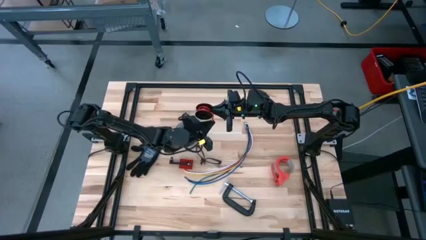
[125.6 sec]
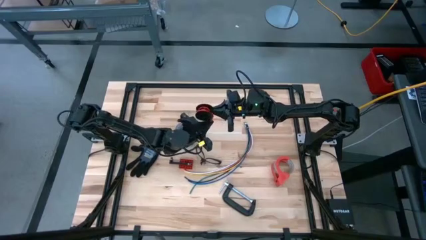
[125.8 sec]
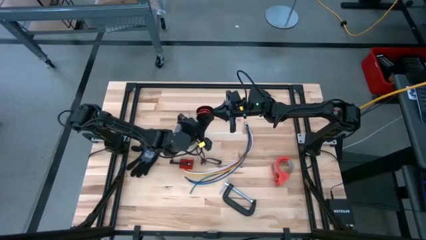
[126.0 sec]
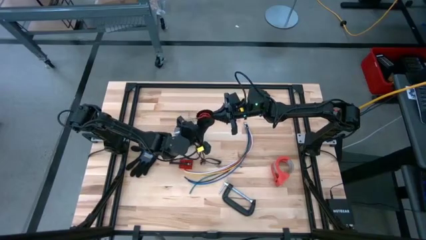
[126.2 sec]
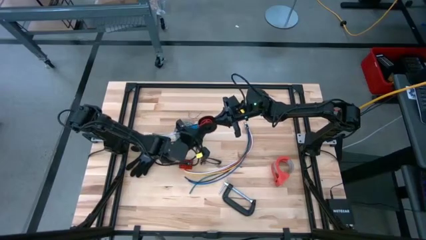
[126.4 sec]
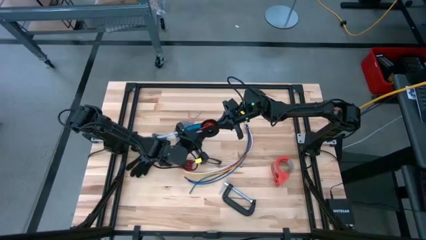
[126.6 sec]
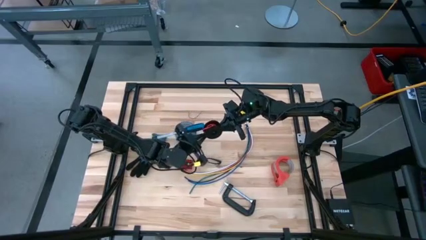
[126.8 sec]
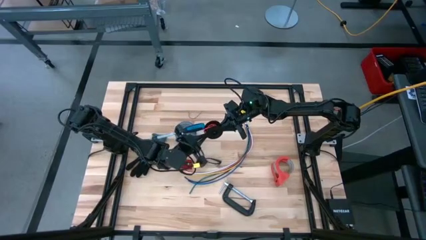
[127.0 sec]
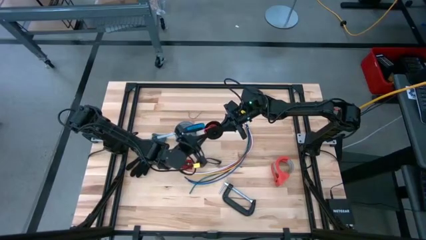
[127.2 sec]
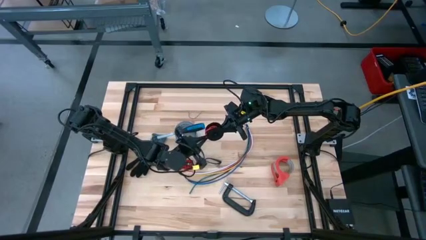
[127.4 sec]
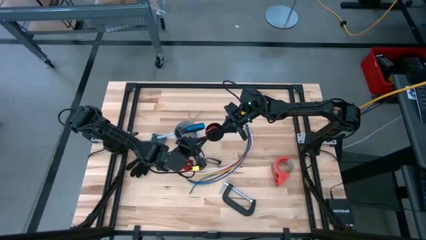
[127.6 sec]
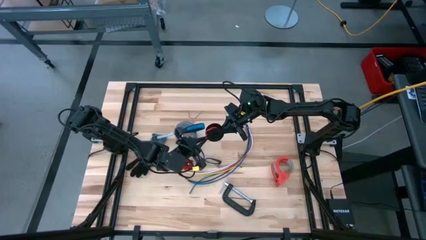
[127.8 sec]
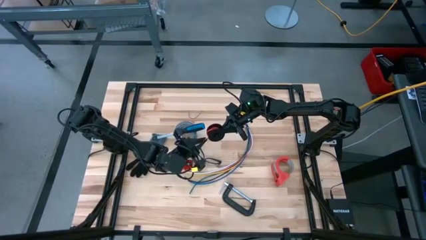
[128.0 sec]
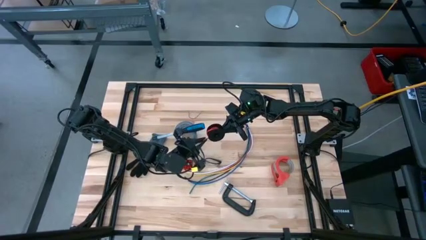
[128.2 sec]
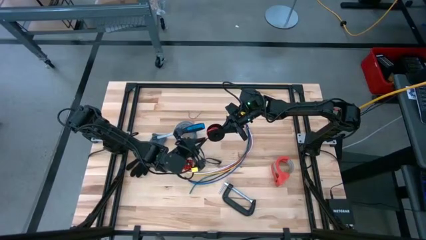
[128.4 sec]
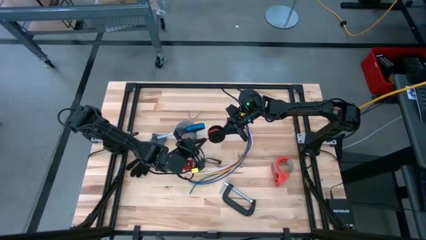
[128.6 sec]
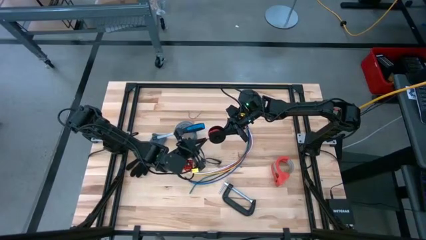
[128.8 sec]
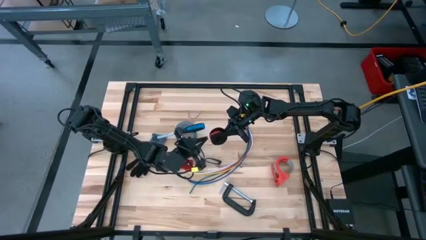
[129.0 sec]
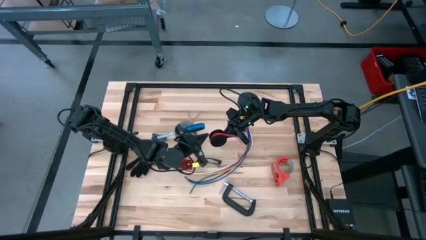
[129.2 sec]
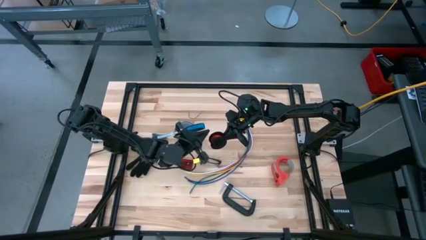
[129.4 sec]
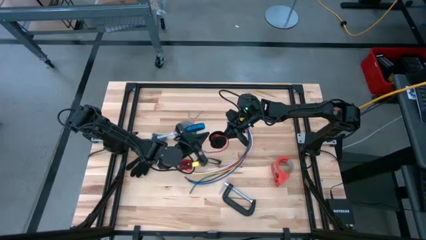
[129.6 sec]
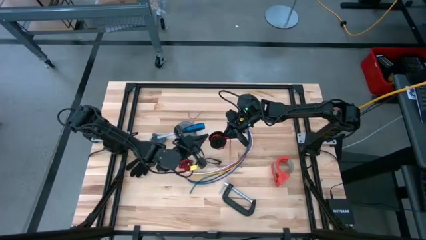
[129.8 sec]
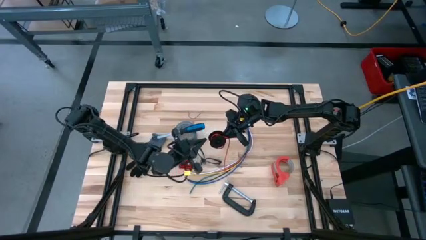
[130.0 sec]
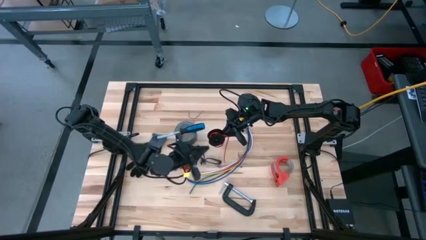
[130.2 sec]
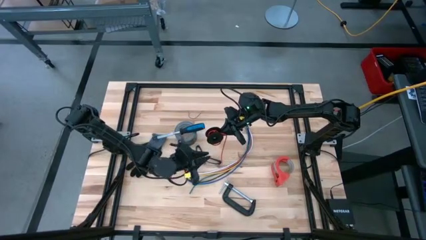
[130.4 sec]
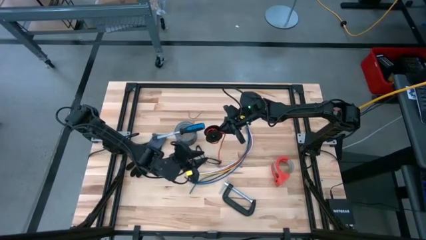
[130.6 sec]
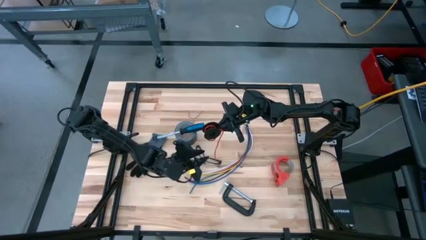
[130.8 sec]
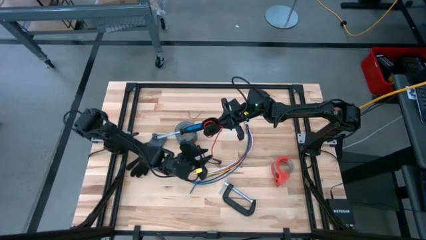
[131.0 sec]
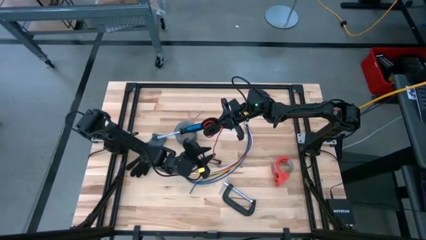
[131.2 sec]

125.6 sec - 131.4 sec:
Task: Coil cords
Coil the red wire onto the black spool

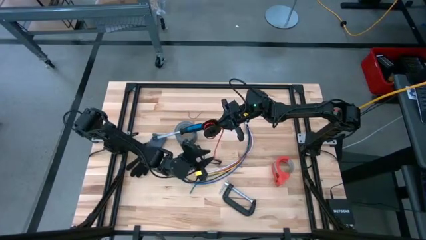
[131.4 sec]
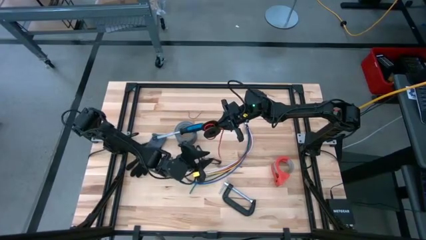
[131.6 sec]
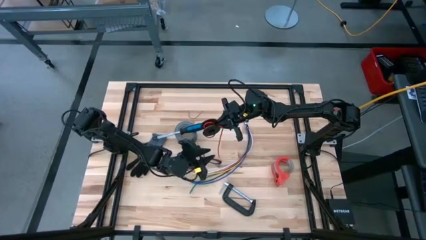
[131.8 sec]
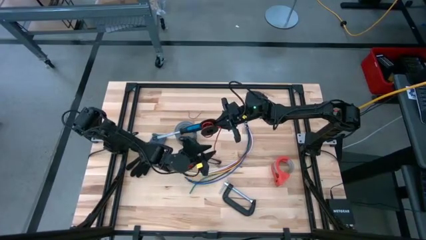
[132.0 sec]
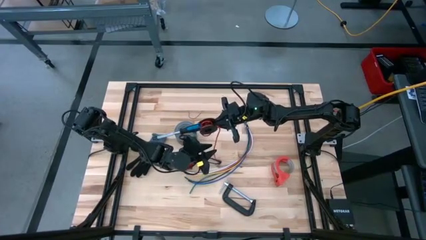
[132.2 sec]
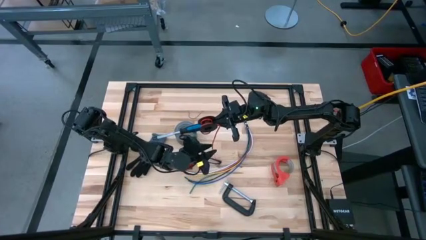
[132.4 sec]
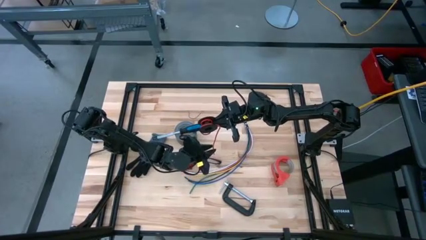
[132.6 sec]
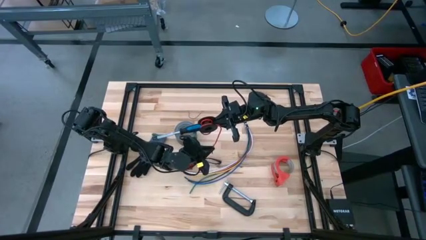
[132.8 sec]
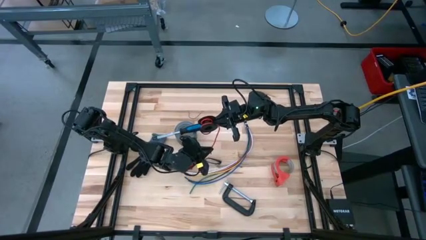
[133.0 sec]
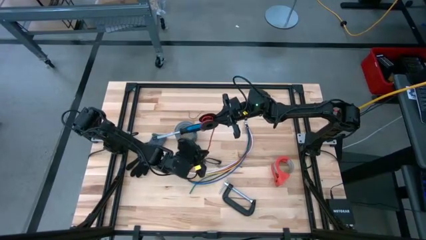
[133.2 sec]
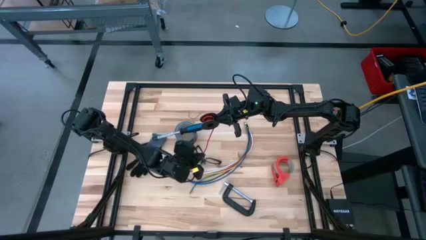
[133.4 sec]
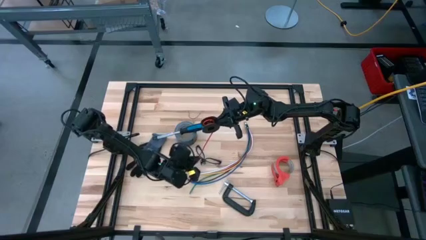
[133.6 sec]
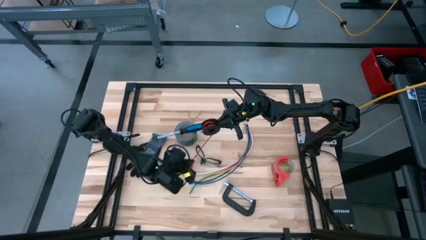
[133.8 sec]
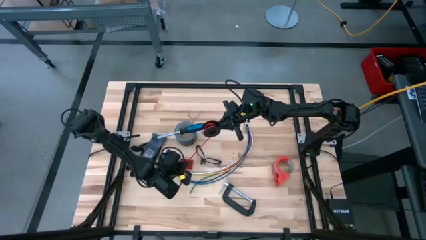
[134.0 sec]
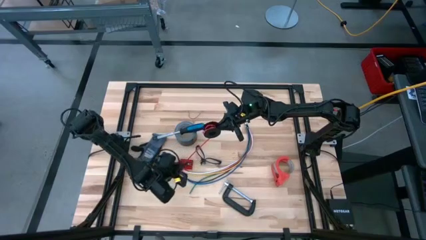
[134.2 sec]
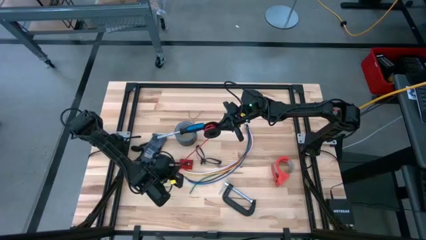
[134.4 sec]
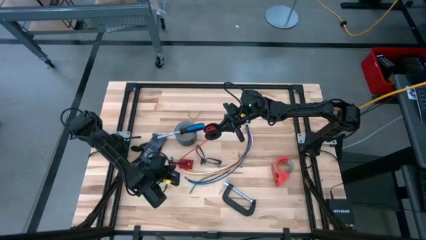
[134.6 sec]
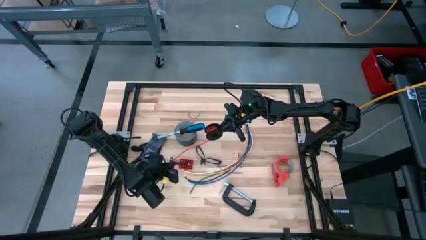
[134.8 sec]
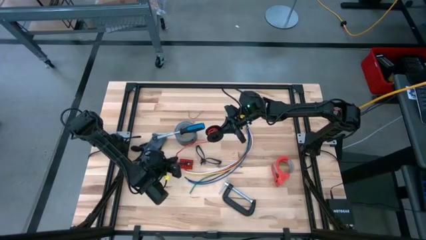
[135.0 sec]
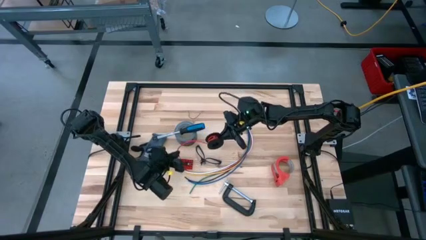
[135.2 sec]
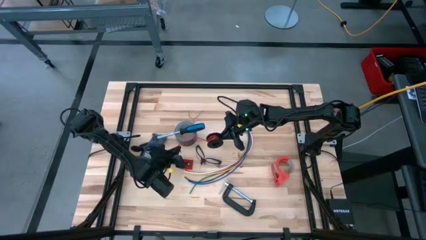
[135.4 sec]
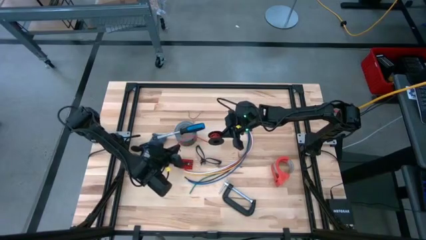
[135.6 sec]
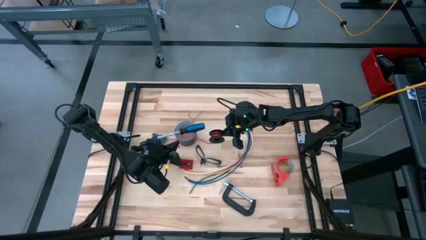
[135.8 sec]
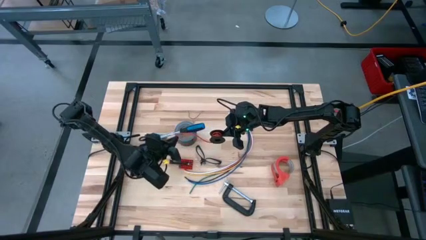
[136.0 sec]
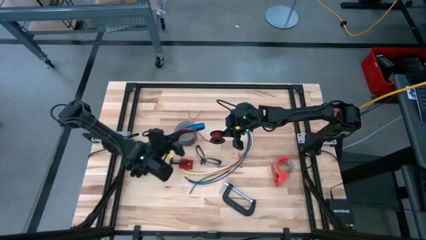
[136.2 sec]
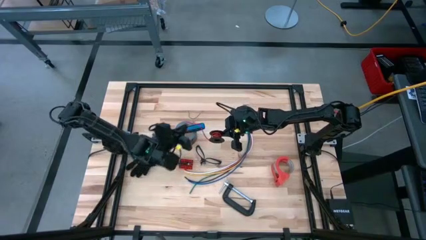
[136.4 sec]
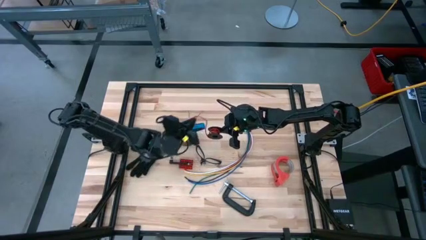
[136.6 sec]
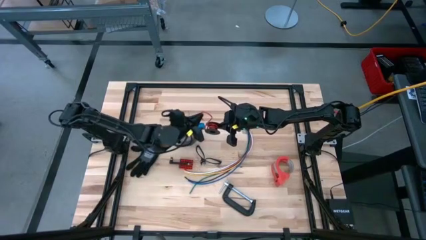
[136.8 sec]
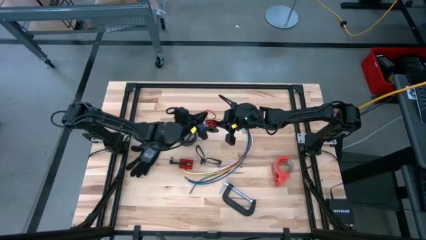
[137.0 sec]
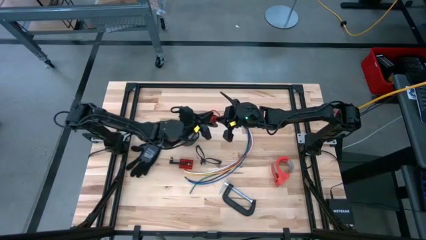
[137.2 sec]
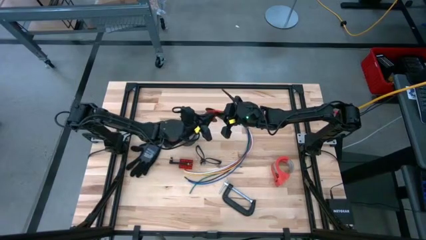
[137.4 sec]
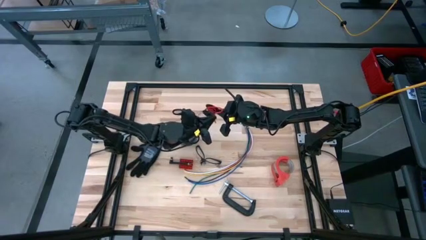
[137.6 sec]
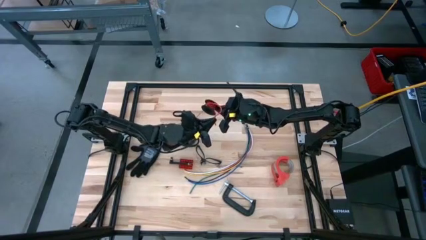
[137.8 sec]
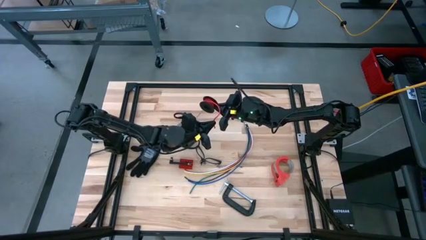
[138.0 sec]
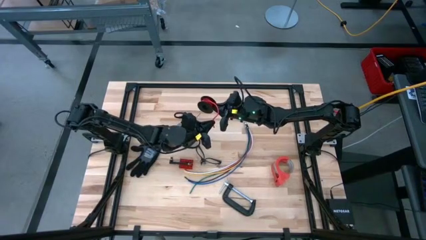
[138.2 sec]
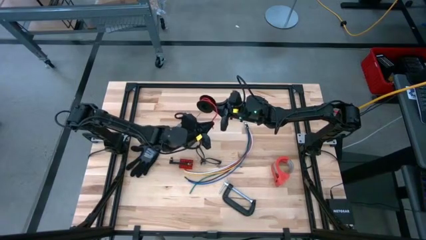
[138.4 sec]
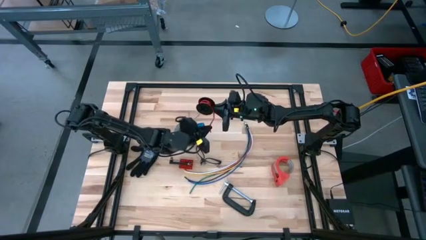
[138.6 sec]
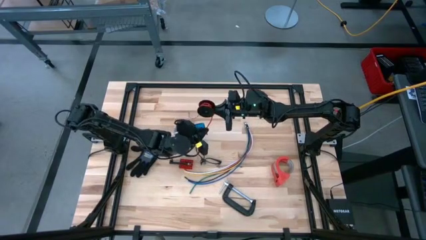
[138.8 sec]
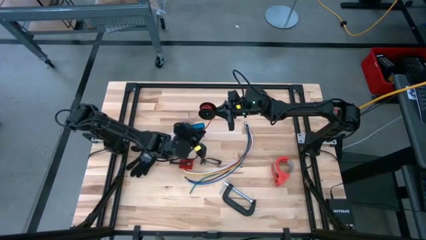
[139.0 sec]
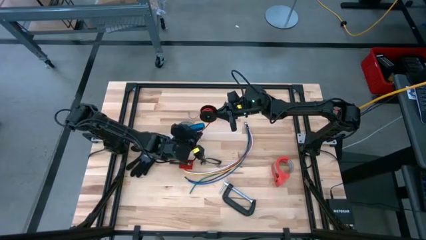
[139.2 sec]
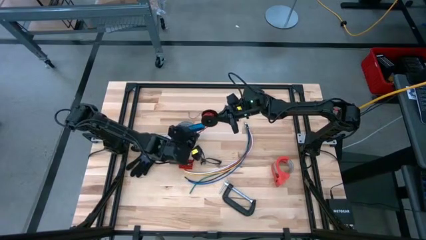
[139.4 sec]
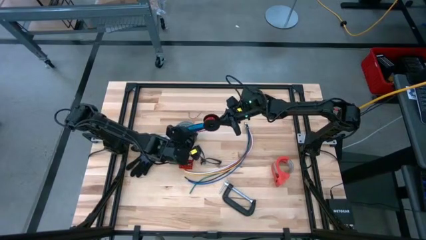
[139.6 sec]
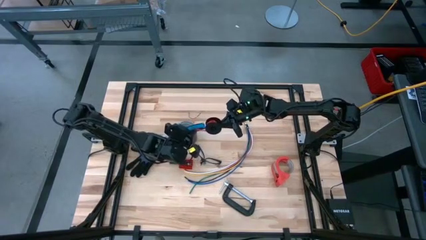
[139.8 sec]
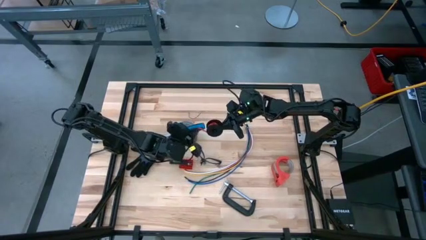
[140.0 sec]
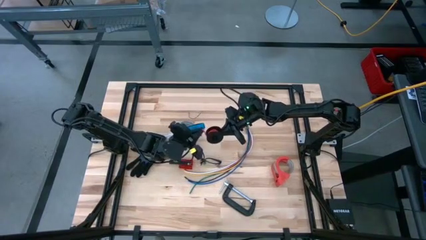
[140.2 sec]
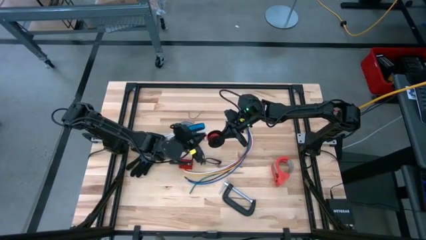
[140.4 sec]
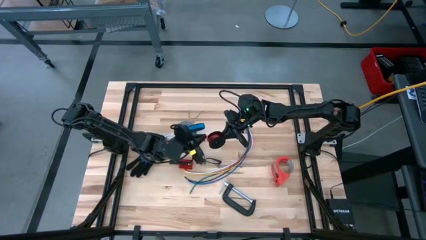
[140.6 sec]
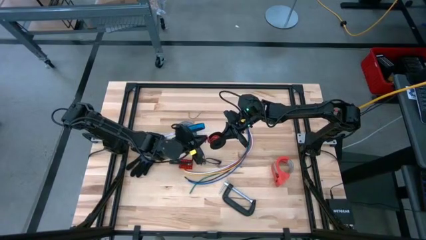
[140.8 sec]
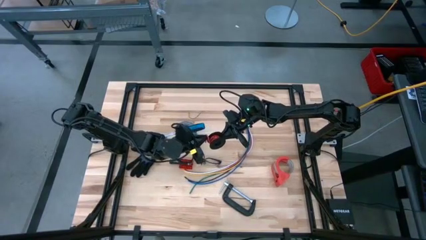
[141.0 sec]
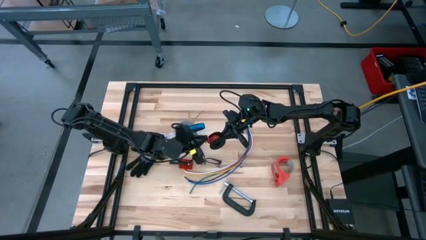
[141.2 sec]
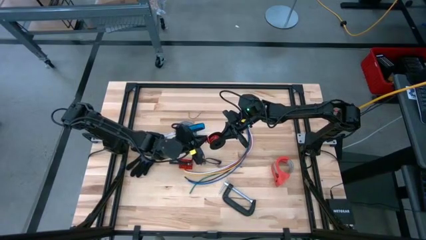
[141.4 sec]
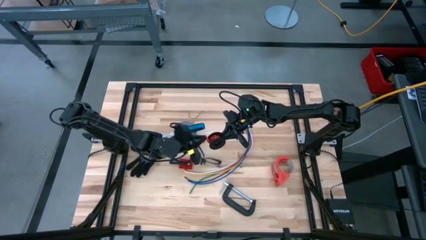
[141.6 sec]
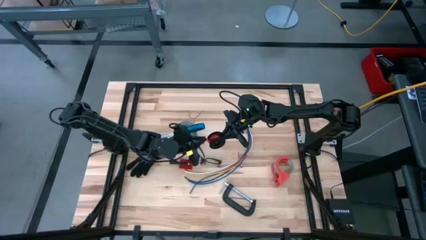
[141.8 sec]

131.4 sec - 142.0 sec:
Coil the red wire onto the black spool
